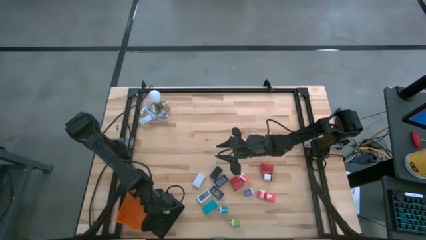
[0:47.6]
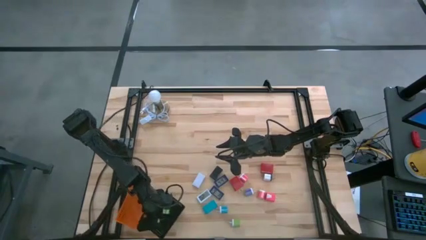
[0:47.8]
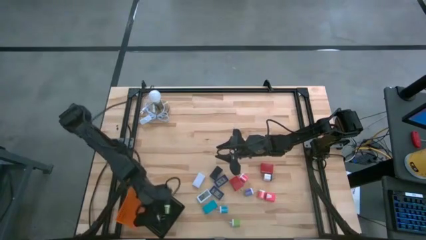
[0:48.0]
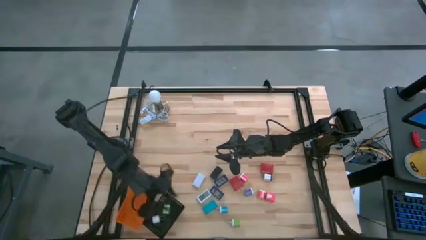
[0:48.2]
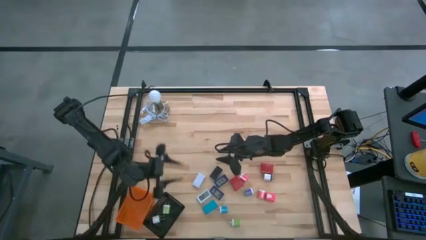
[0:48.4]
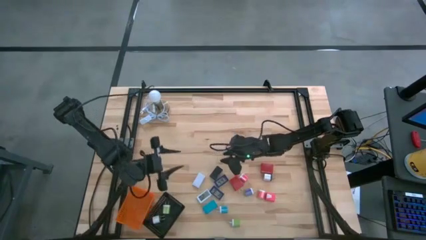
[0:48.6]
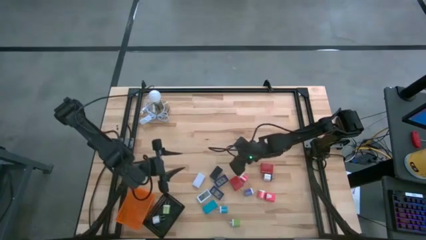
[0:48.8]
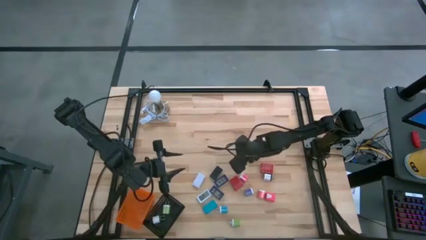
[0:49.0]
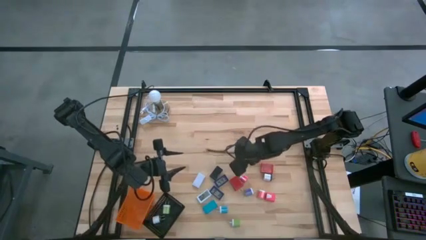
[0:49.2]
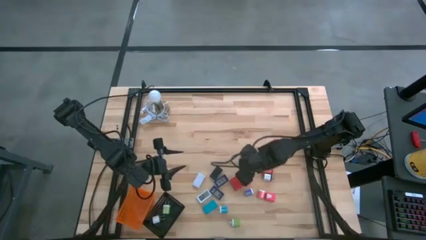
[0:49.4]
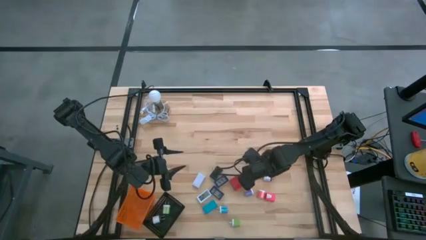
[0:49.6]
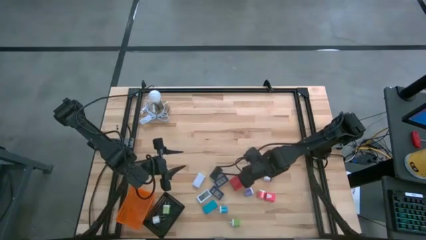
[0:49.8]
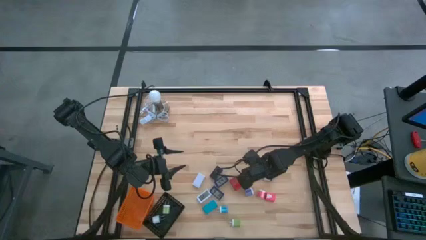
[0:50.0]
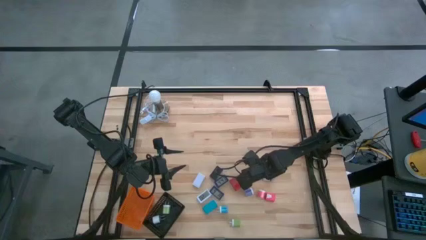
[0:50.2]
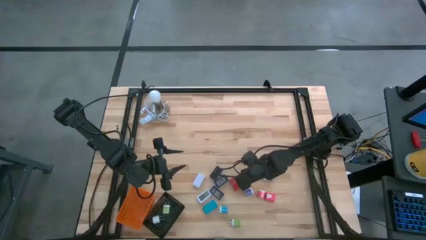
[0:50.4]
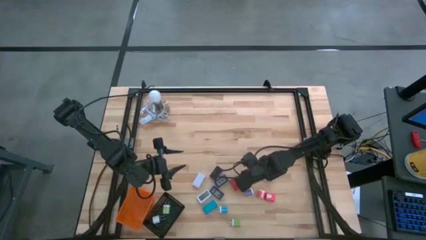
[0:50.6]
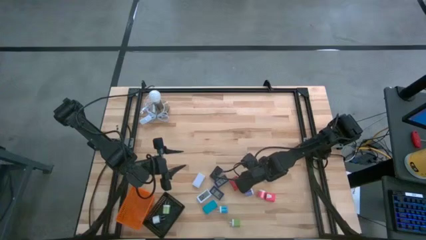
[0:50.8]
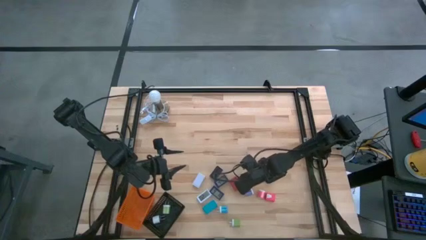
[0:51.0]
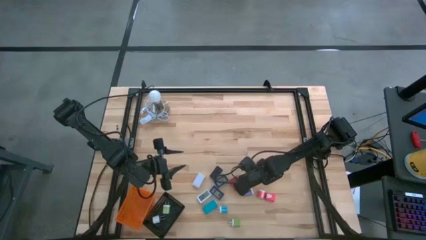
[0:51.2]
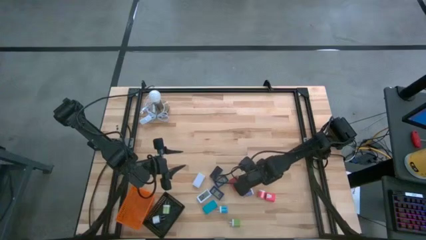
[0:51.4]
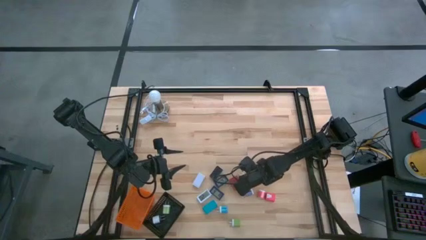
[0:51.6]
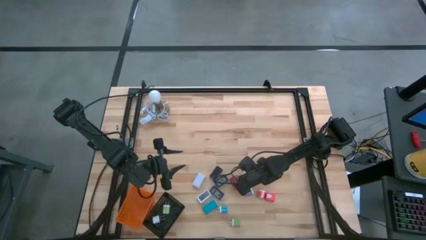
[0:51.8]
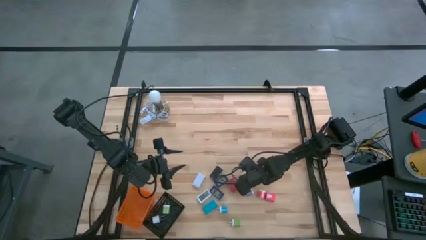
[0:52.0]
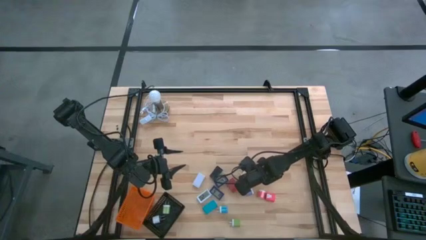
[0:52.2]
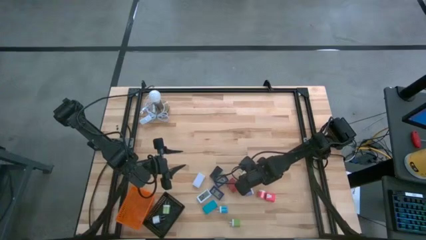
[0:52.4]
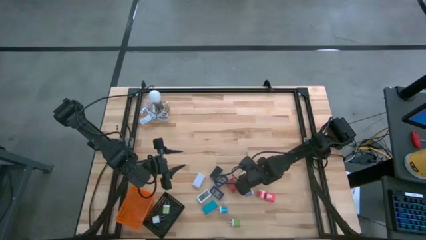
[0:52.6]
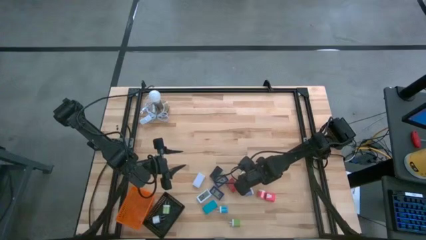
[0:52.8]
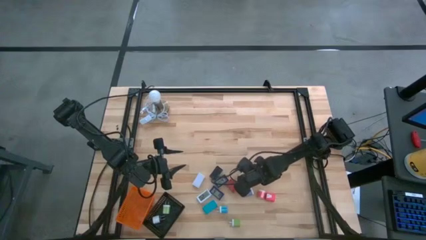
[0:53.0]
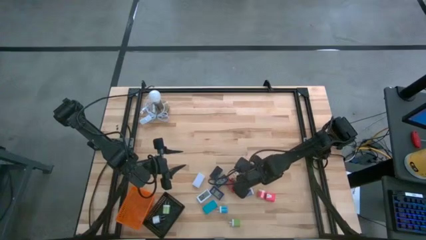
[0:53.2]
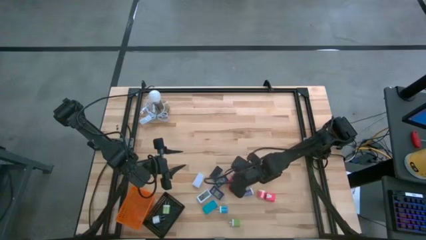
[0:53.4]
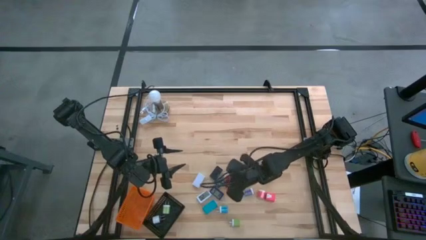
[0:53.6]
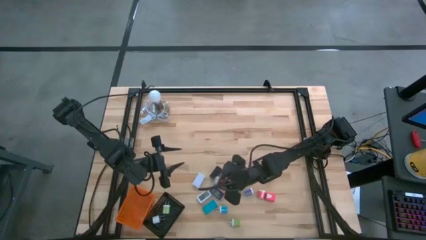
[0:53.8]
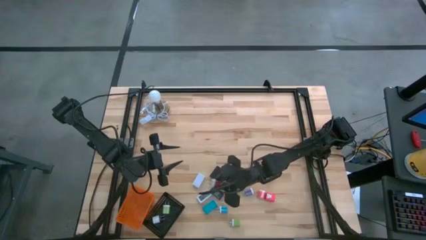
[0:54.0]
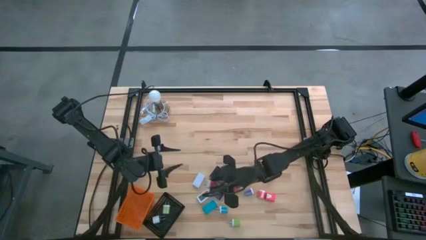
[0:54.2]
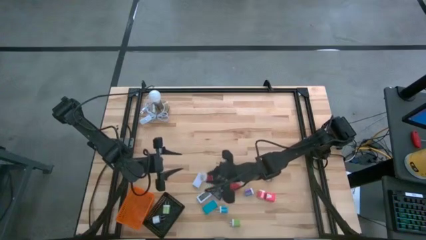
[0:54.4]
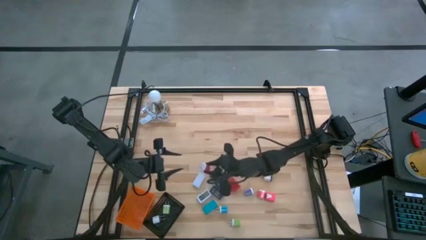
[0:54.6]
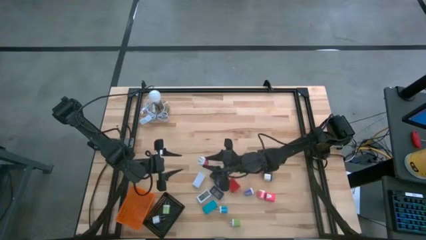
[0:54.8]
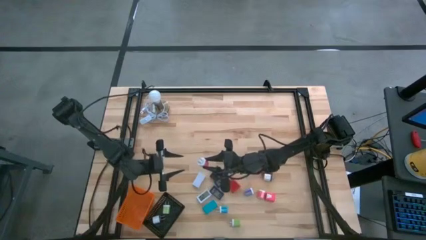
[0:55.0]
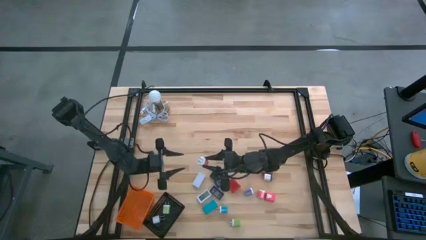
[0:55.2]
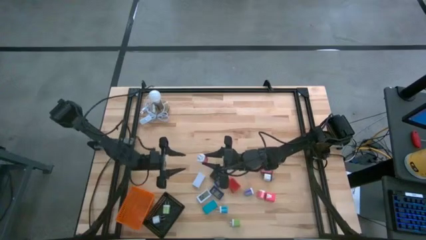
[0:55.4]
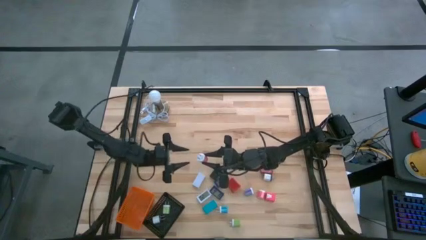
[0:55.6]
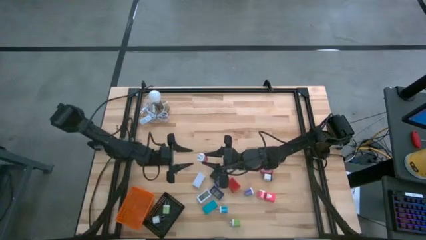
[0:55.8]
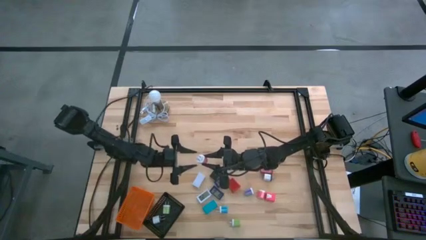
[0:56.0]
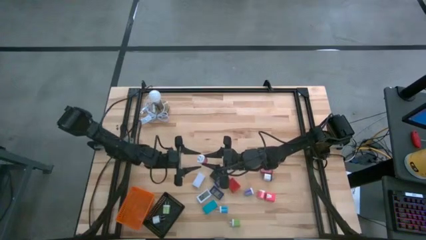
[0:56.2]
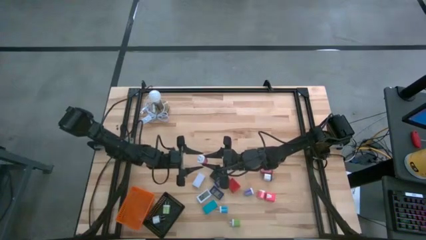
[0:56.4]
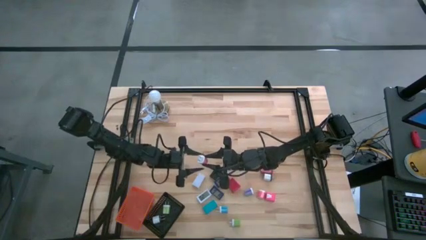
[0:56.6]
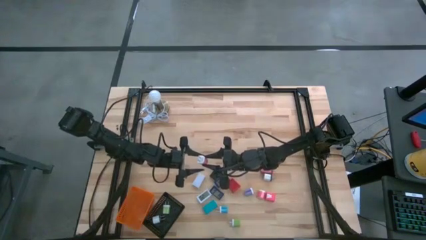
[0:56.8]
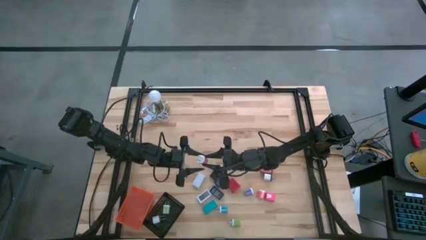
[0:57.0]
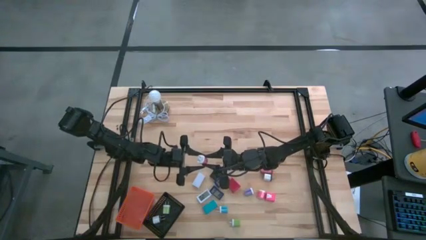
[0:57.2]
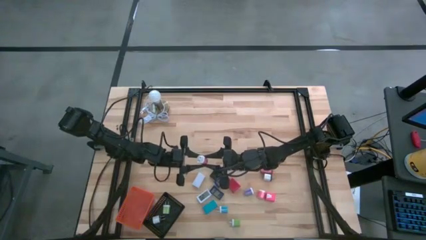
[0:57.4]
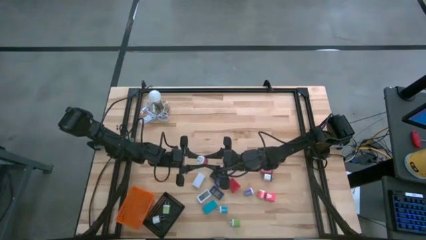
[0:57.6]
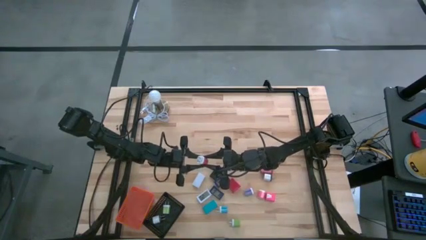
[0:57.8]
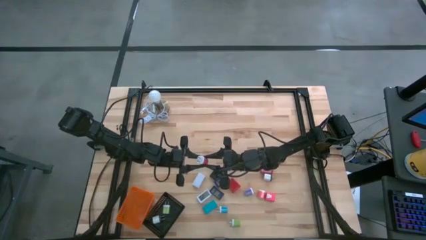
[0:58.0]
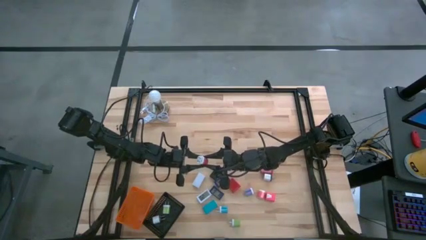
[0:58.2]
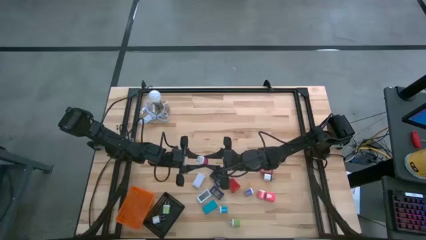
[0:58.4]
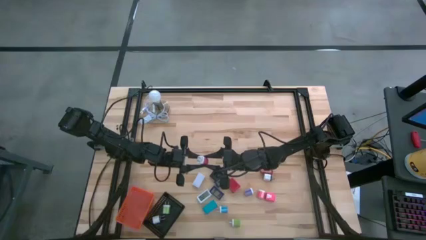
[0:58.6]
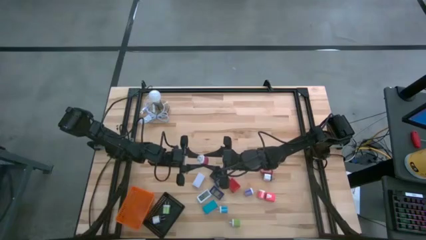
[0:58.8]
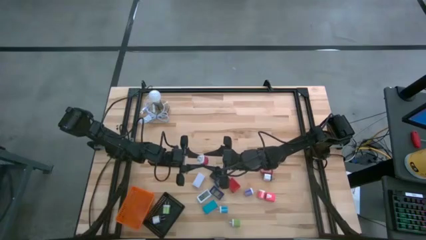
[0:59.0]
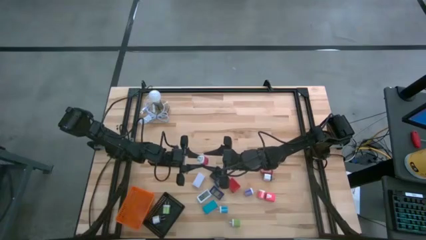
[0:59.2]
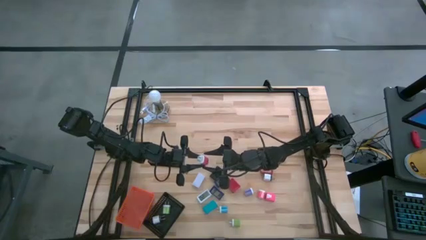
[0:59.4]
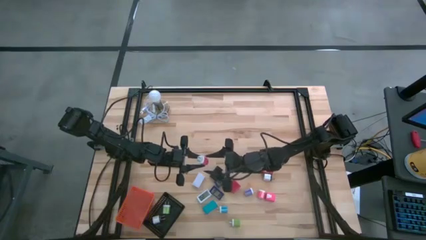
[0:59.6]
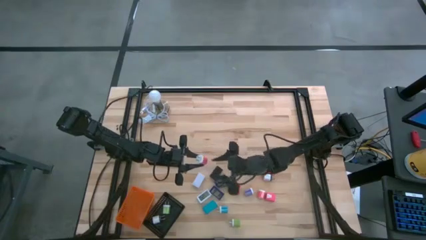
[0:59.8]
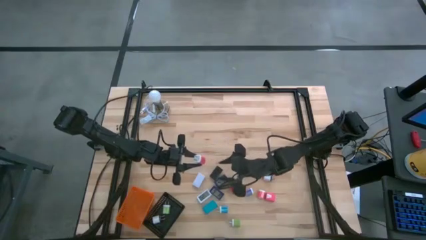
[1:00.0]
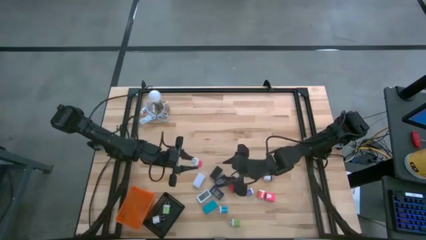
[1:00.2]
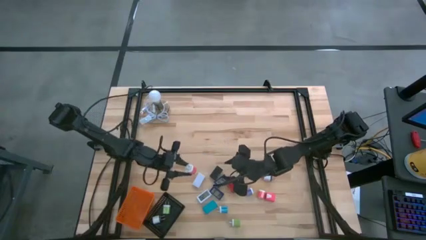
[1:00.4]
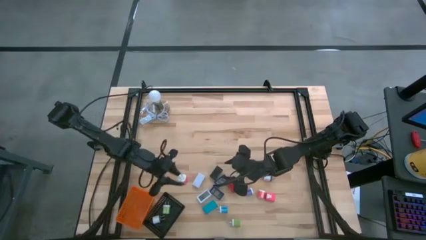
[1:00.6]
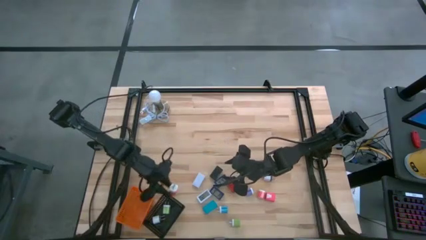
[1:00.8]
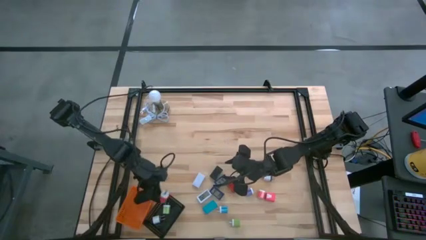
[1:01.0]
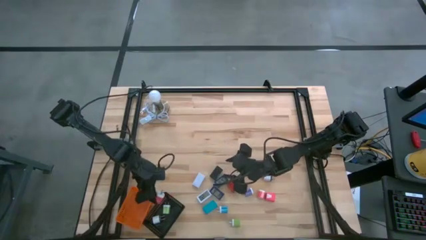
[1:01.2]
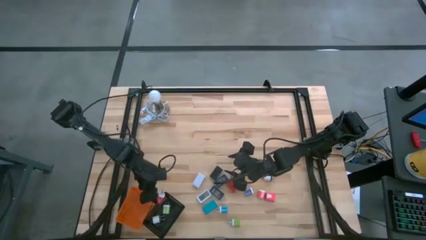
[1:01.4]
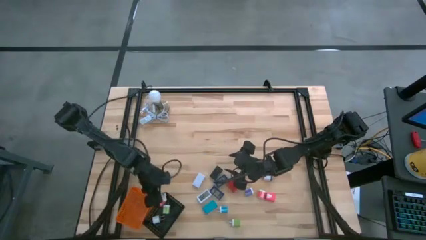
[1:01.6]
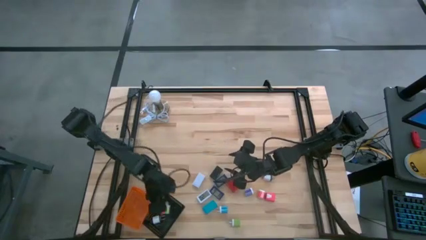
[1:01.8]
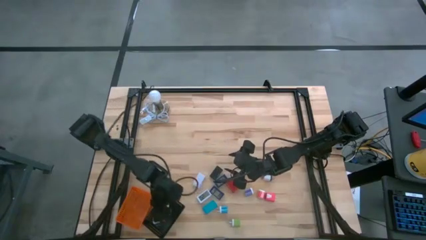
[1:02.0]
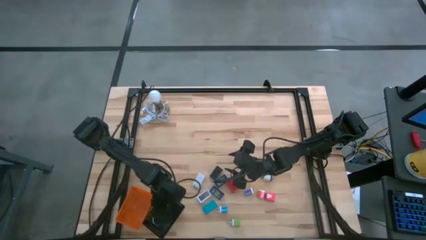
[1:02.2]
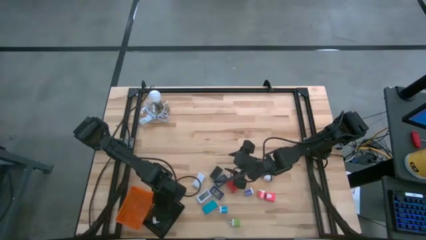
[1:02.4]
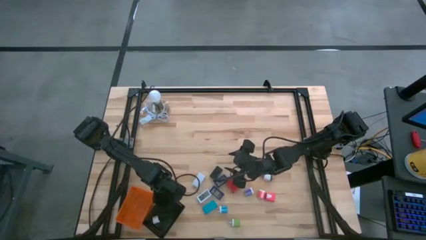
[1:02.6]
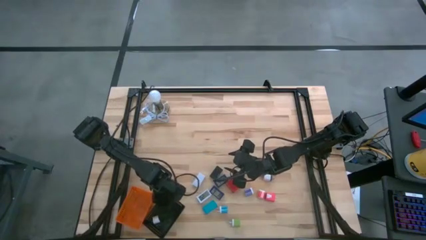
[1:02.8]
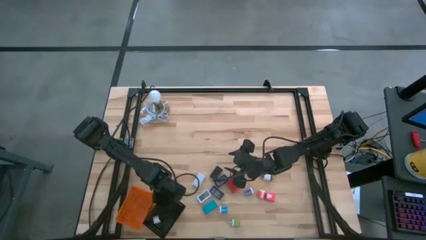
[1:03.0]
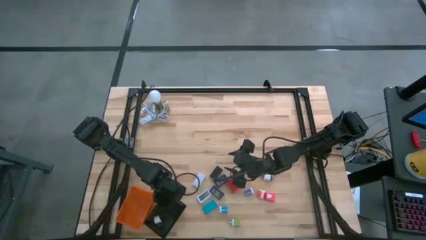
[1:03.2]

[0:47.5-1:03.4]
Task: Pick & Place Office items
Put the top pink white charger adapter into the black basket
